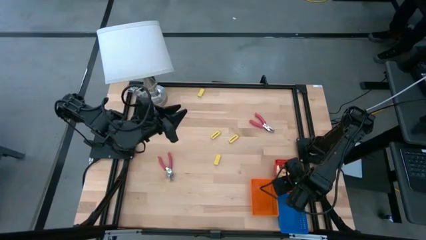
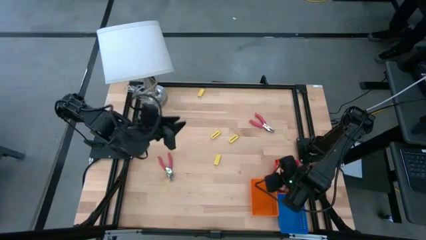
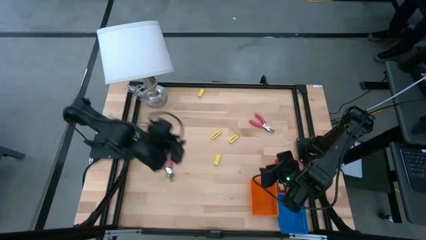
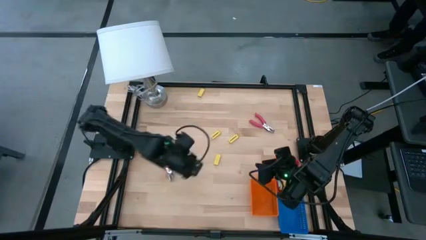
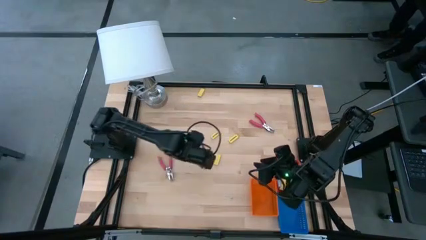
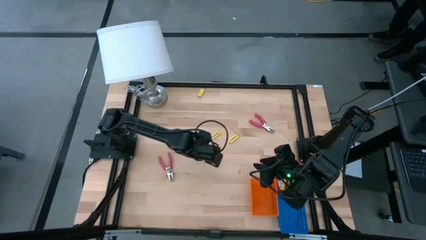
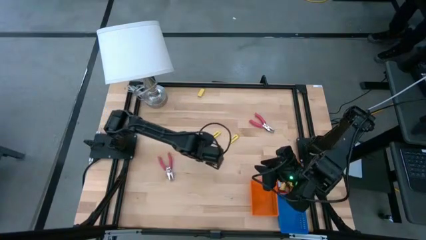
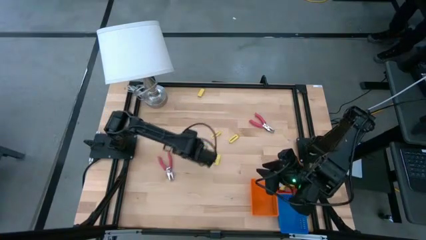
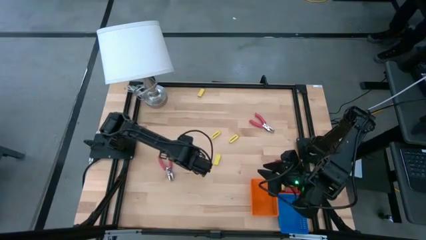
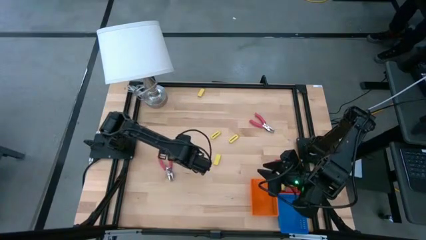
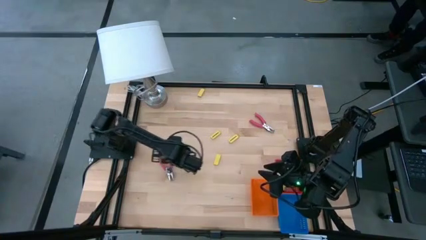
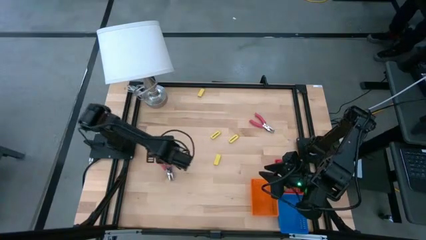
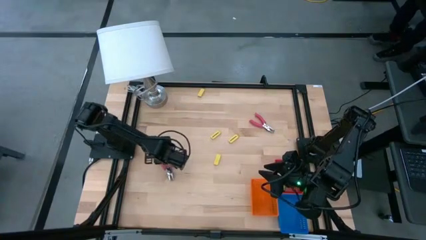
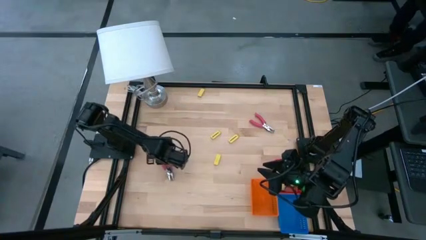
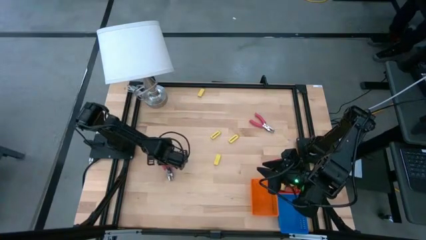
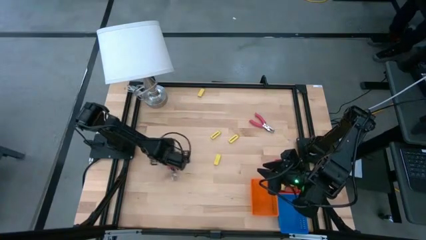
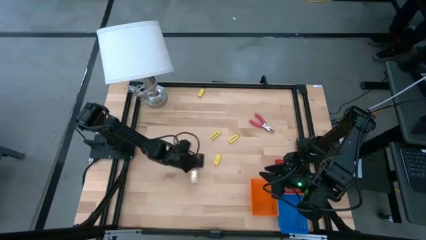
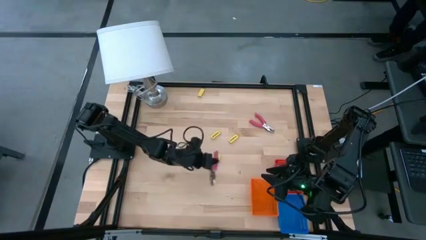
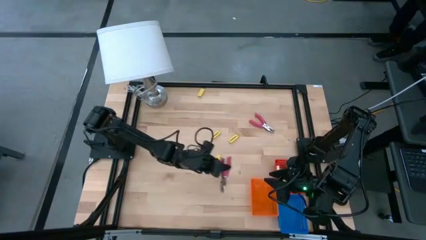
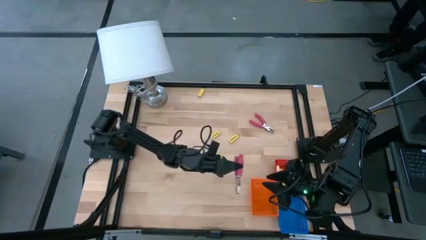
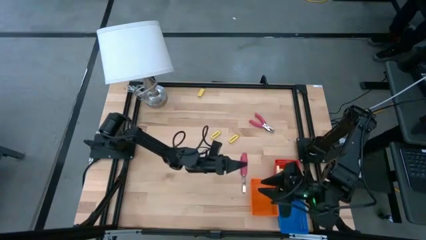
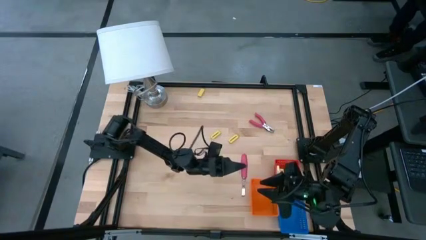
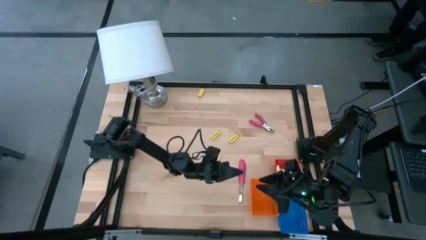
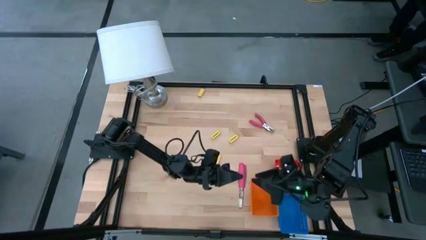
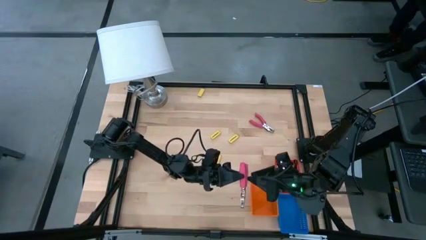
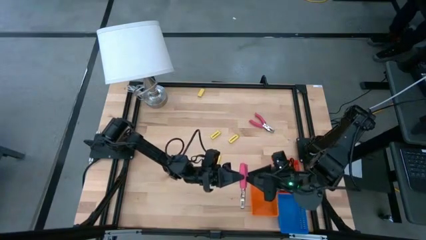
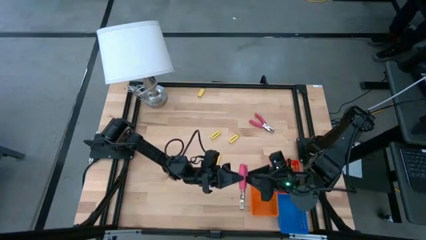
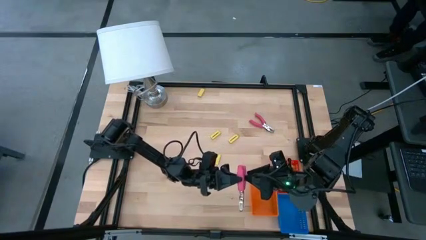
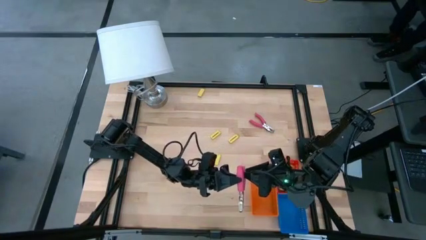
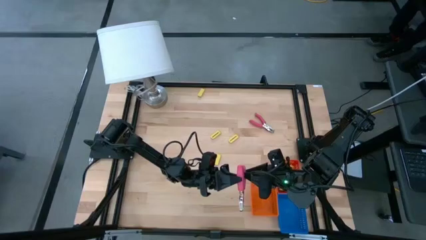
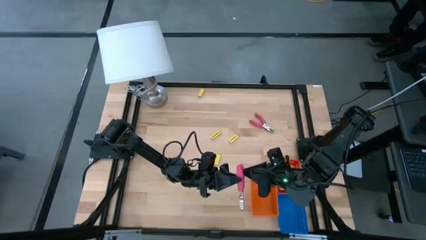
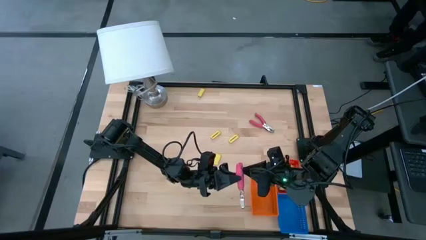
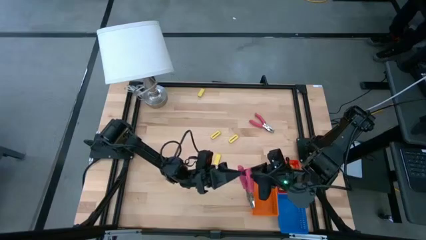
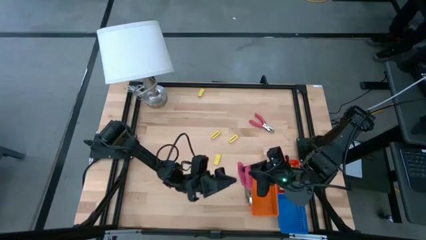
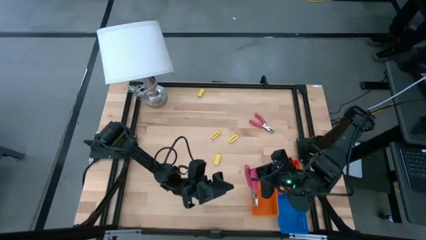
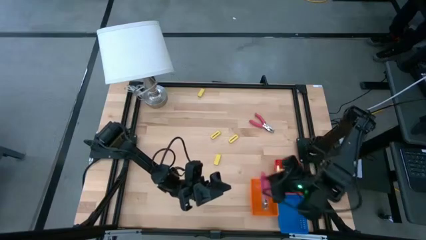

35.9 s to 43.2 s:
Task: Pick & Place School Supplies
Put the pink hole puncher into the orange basket

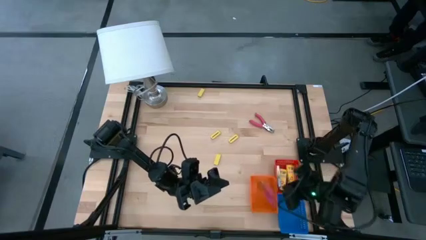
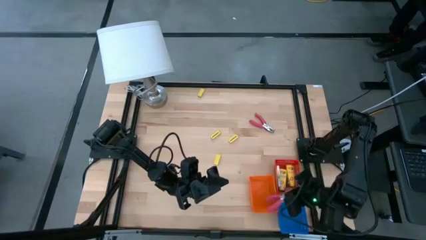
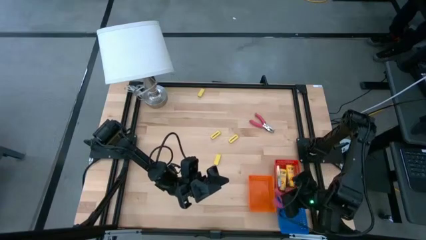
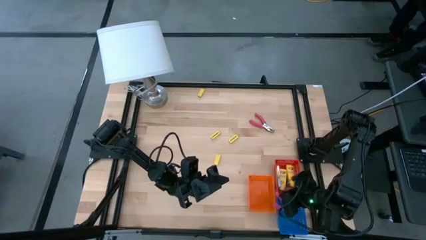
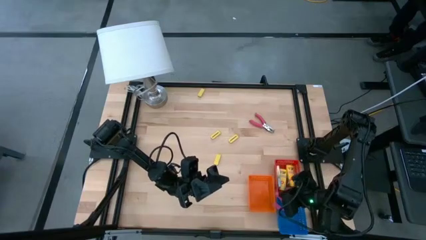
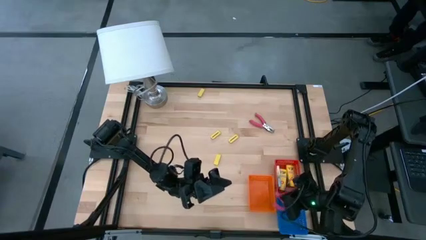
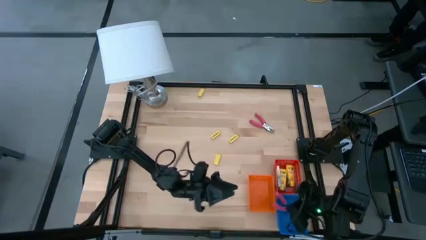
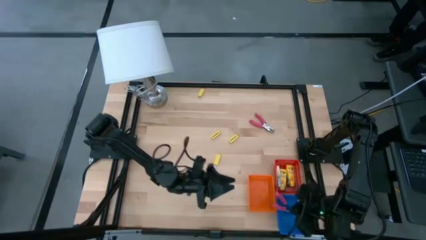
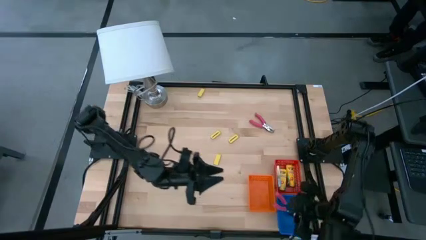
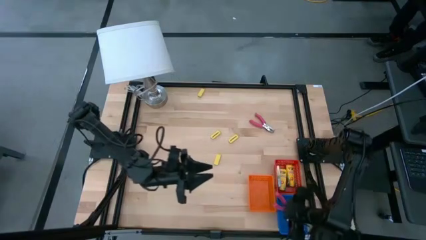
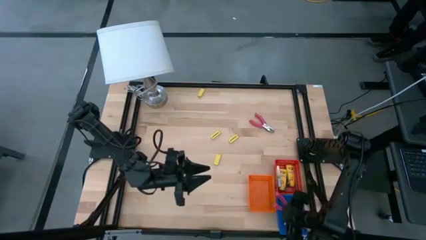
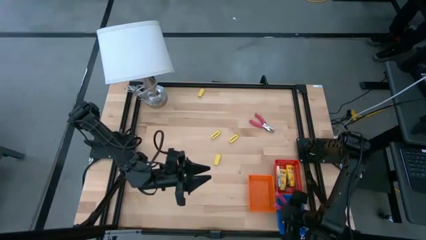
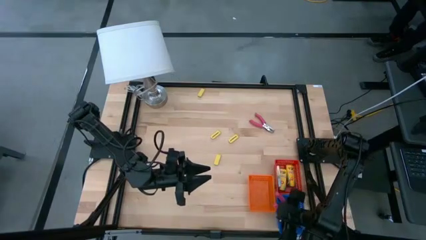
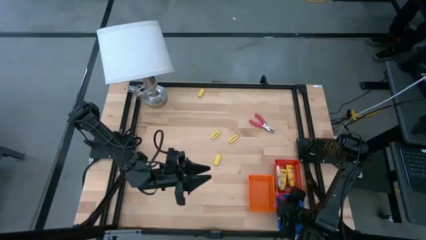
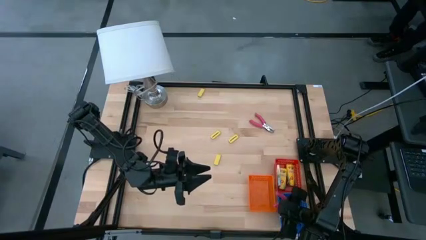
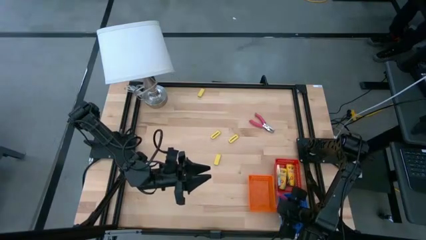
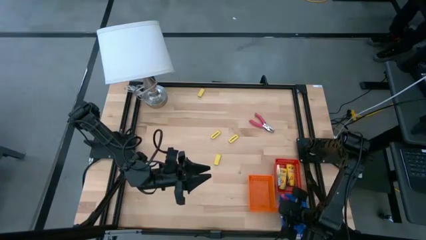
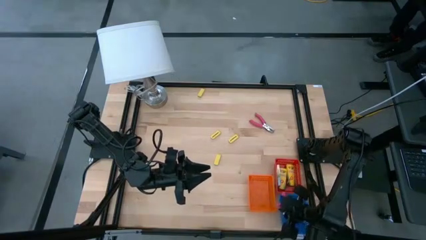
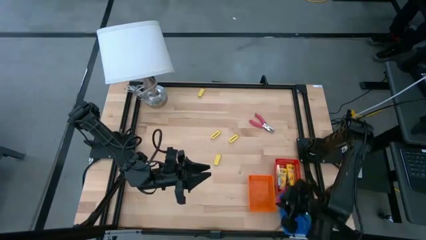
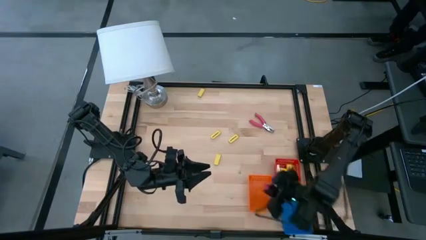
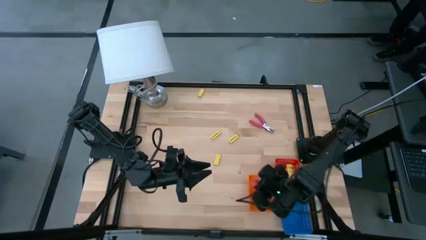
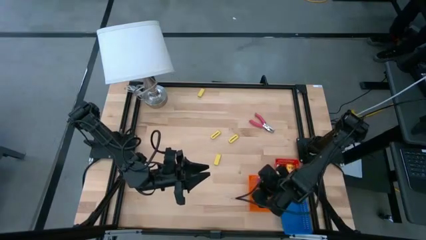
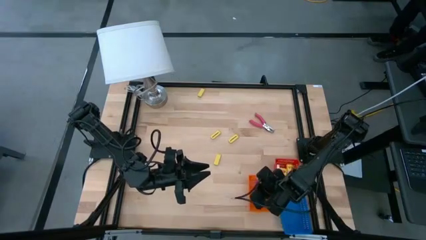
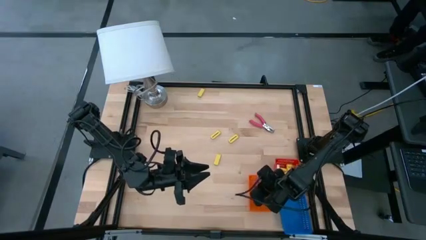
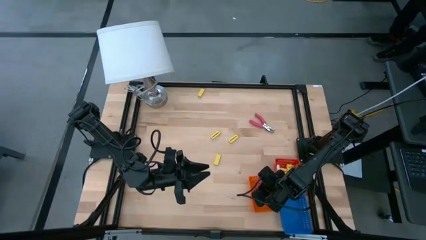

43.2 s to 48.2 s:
Put the pink hole puncher into the orange basket

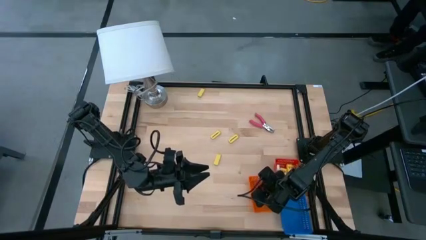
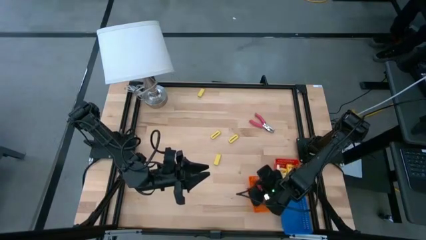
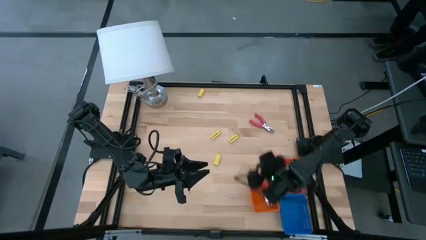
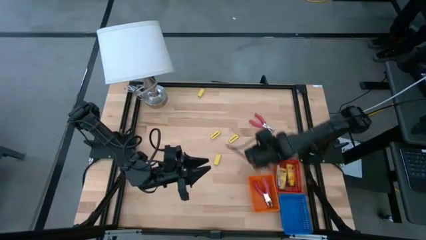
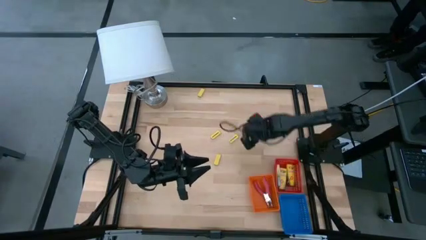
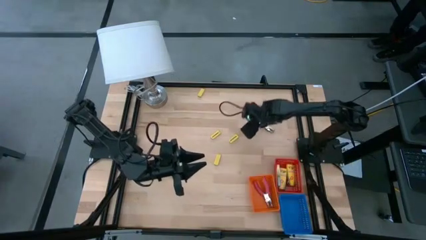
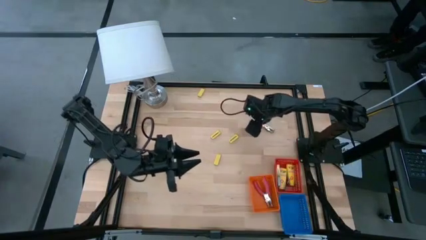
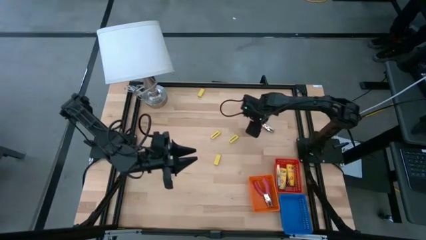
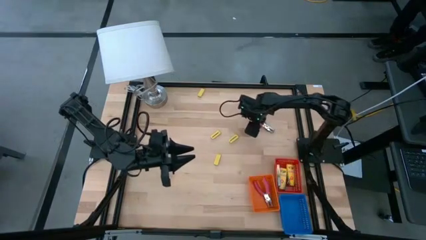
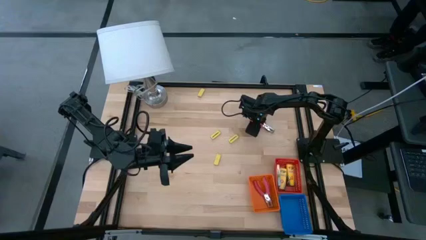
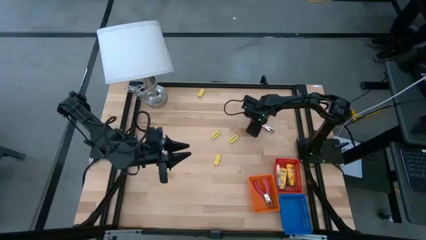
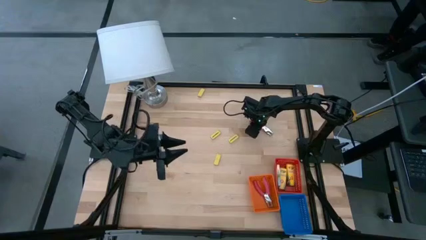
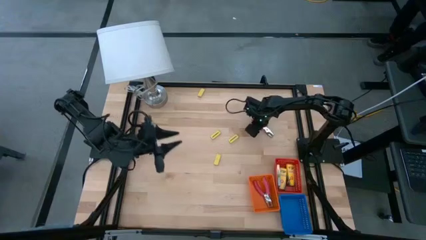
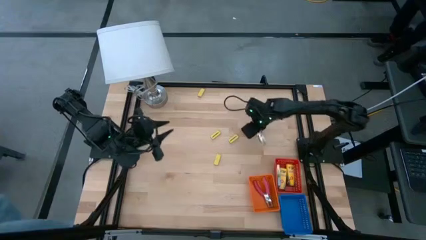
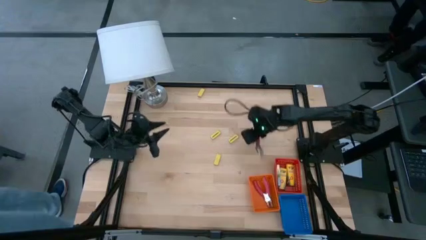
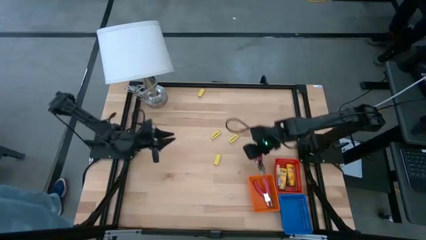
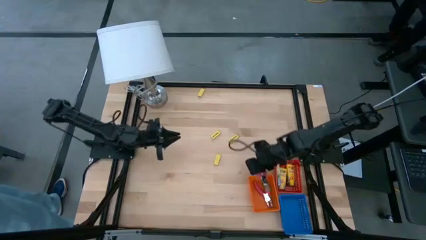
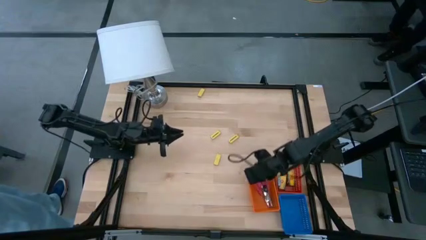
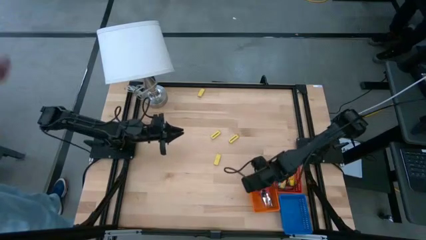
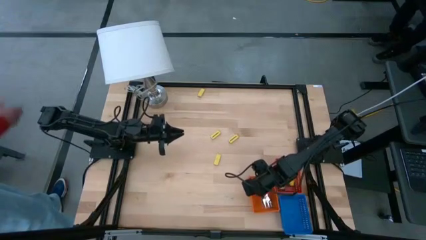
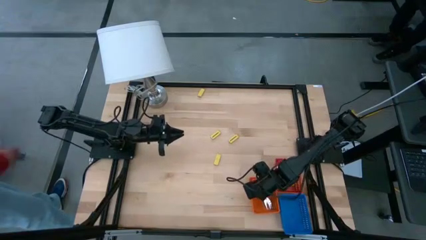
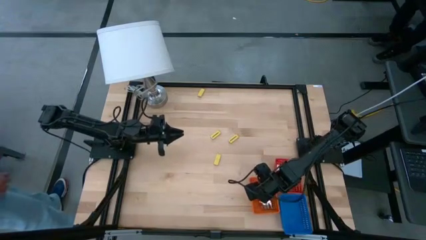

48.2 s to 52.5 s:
Put the pink hole puncher into the orange basket

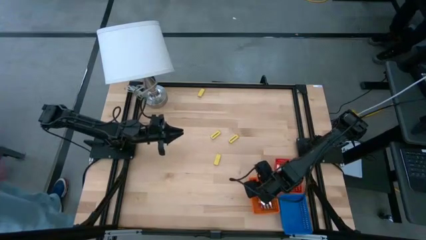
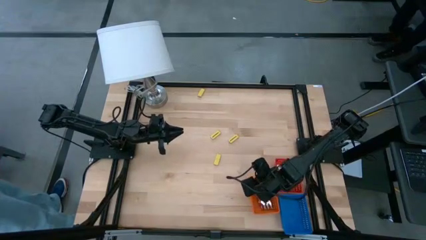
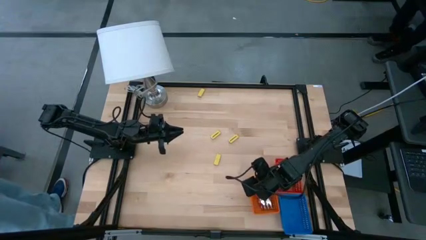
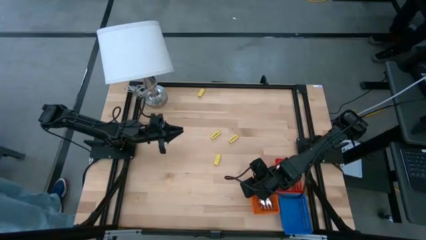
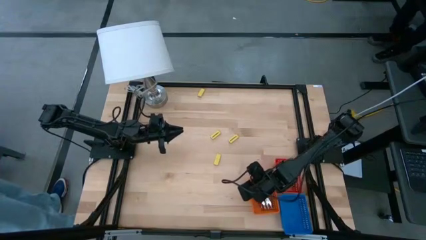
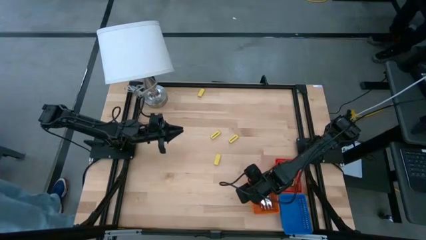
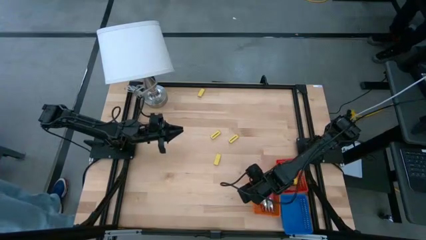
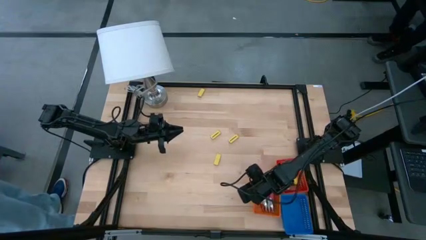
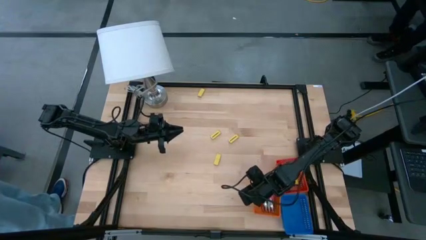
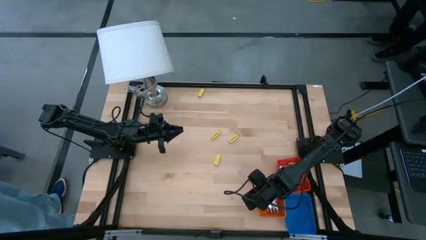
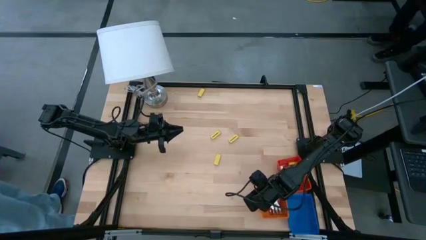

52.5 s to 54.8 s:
Adjust the orange basket
